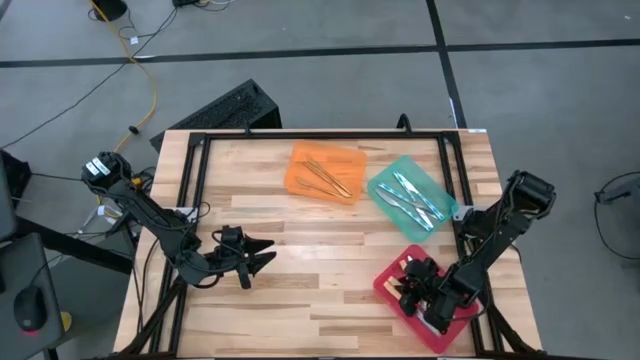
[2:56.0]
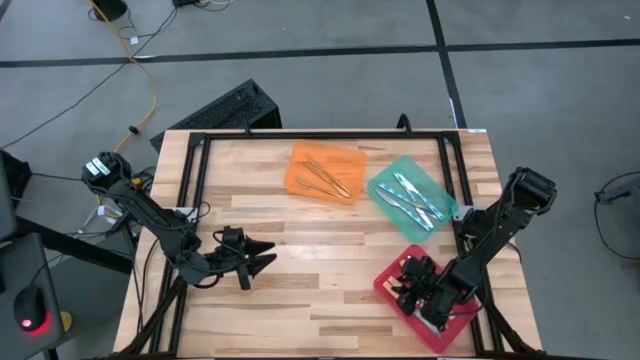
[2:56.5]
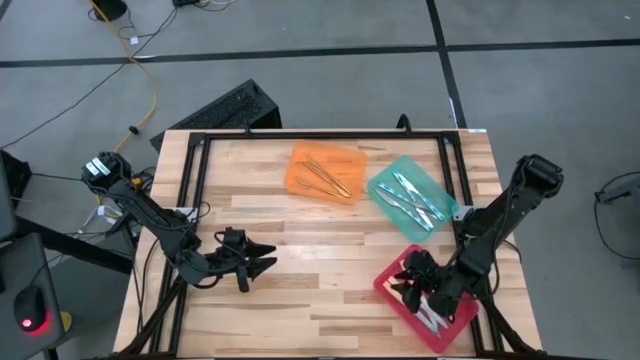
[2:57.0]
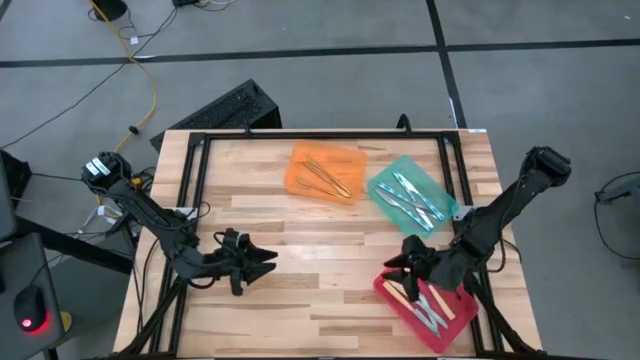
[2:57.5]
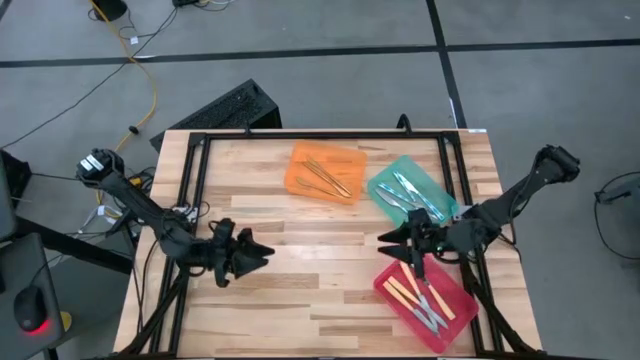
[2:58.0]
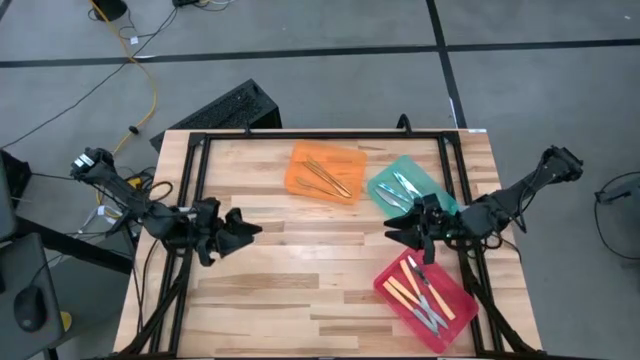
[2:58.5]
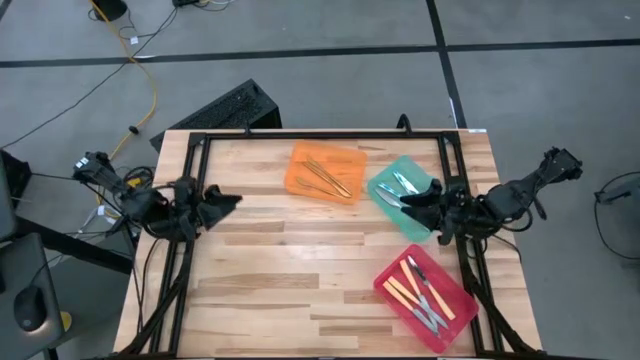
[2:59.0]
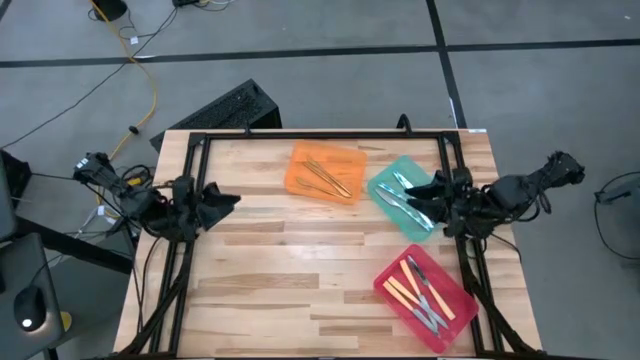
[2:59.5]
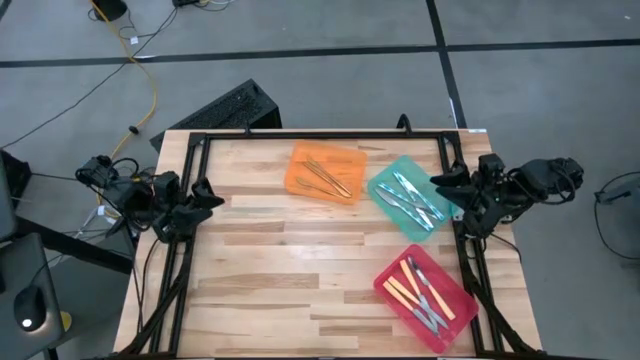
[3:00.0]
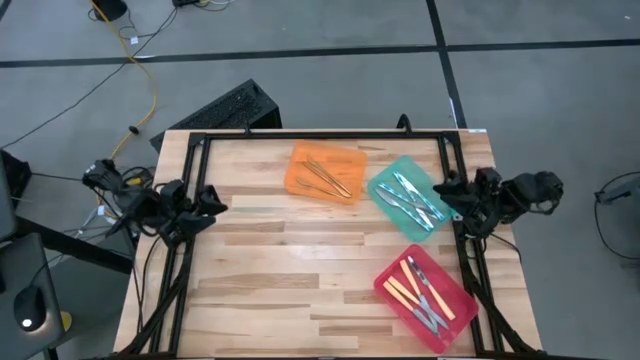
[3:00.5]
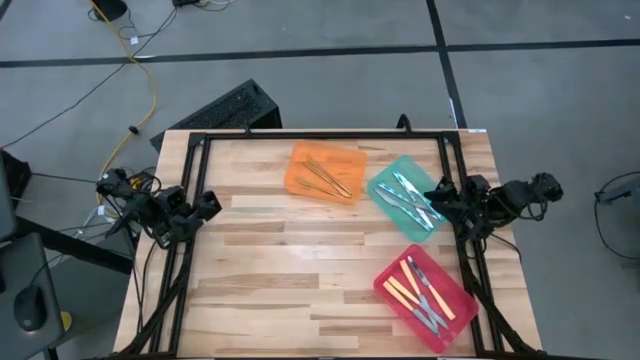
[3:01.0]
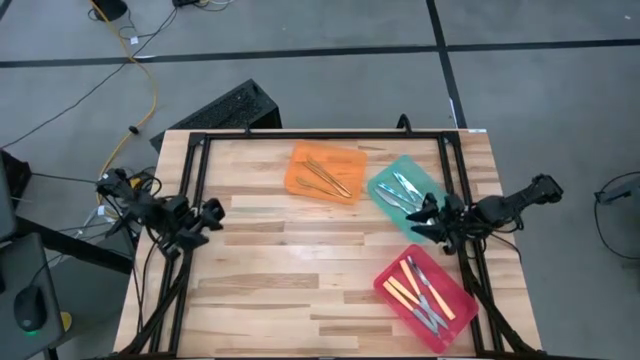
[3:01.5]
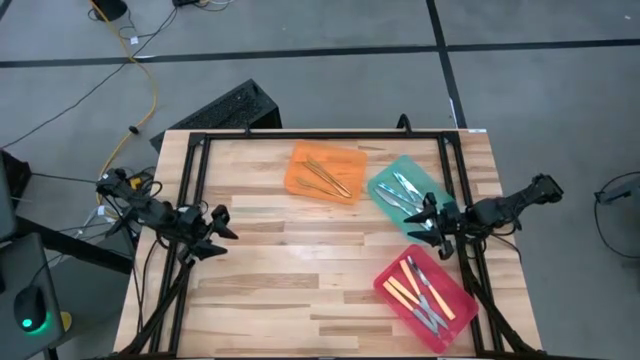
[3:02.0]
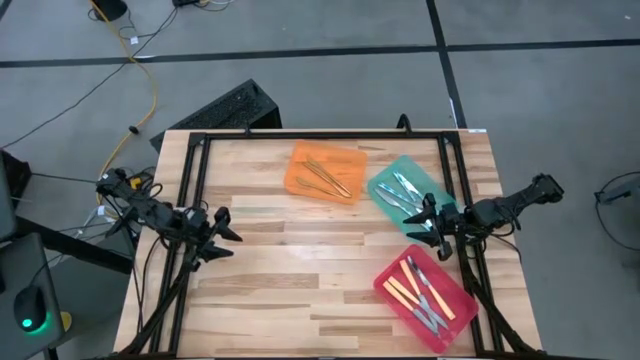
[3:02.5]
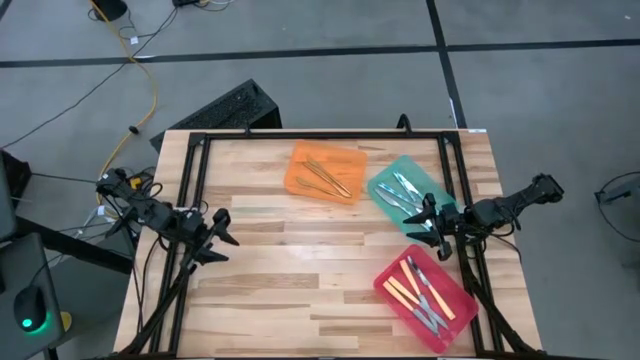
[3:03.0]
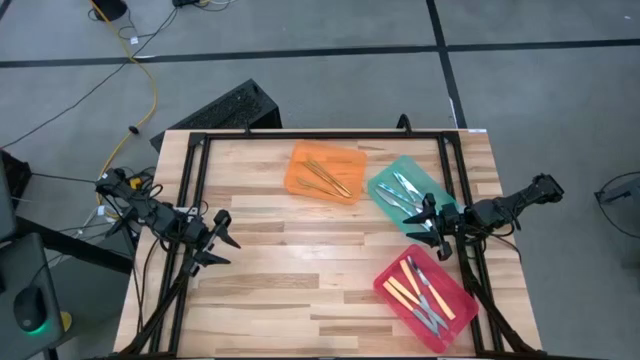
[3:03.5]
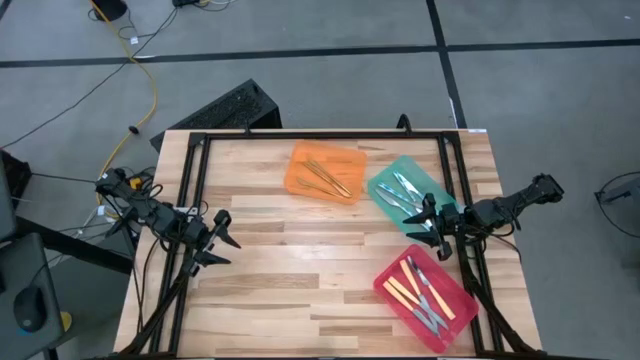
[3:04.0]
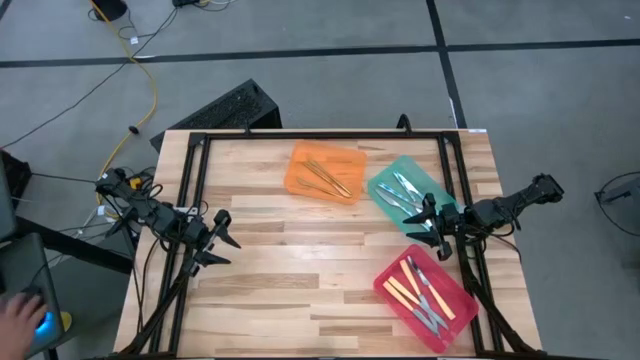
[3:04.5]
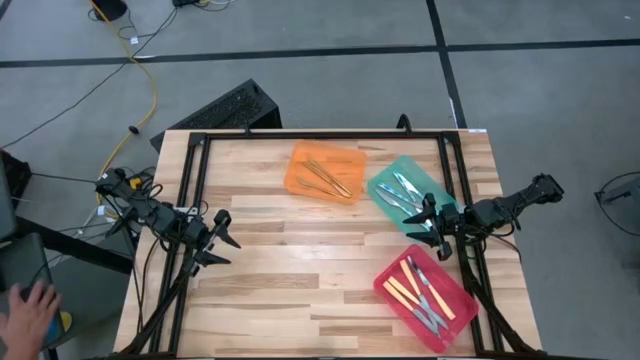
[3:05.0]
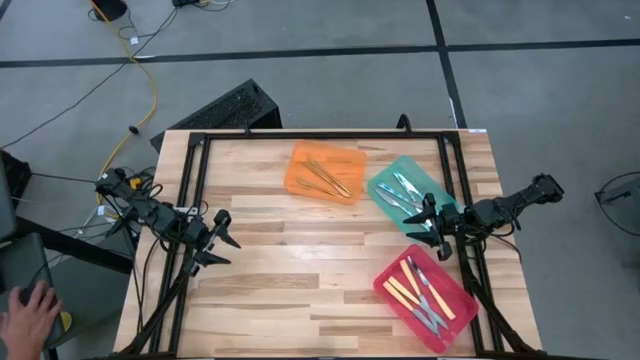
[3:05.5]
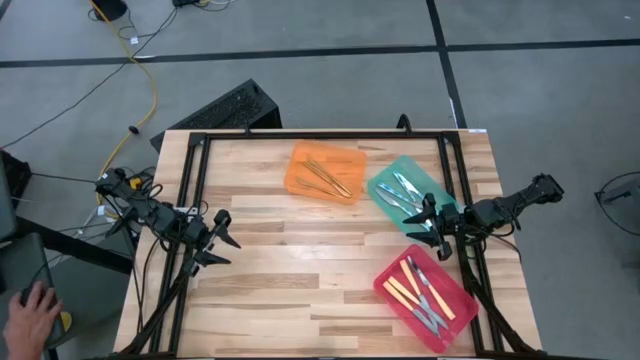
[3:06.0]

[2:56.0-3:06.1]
Task: Sort silverware by color (type)
Return to Home Position

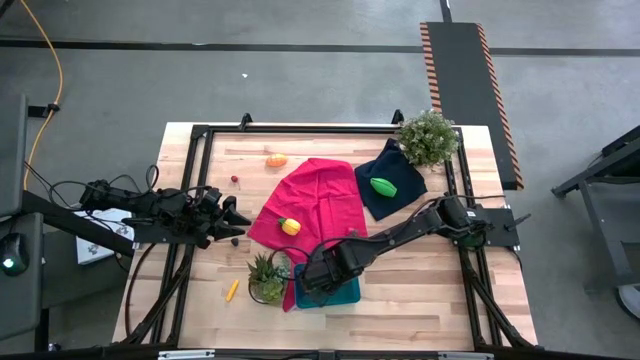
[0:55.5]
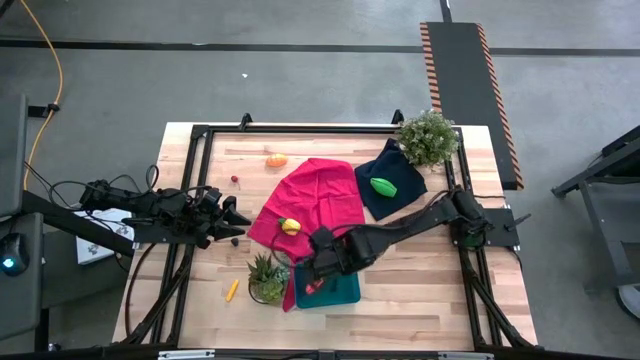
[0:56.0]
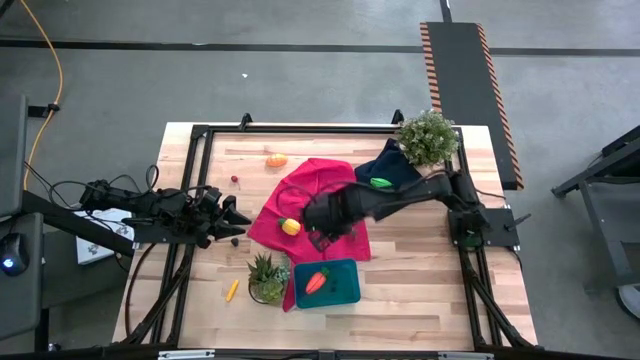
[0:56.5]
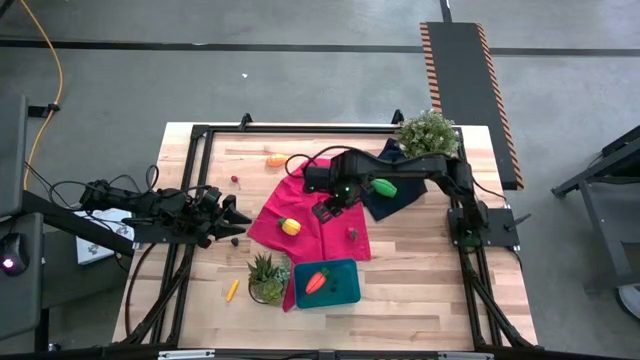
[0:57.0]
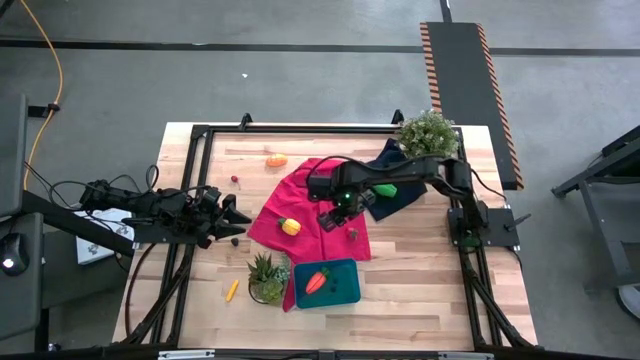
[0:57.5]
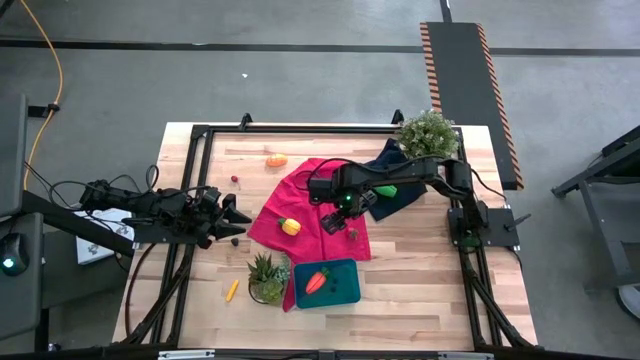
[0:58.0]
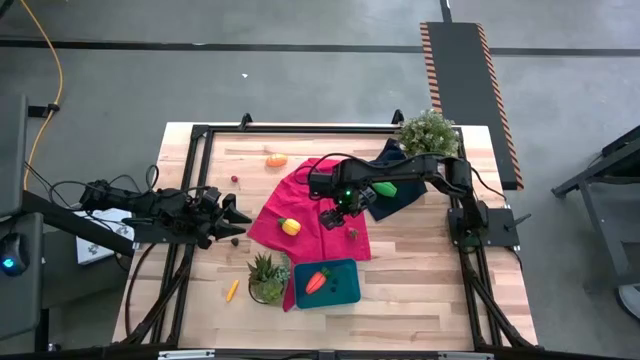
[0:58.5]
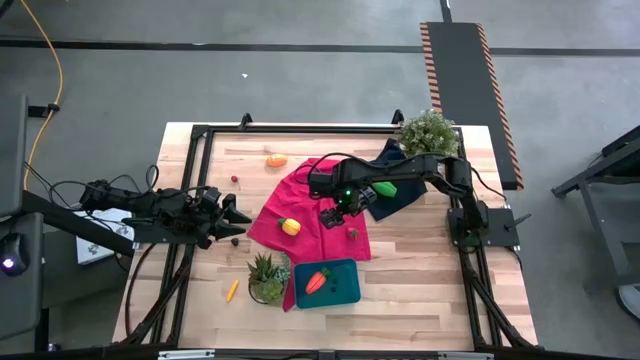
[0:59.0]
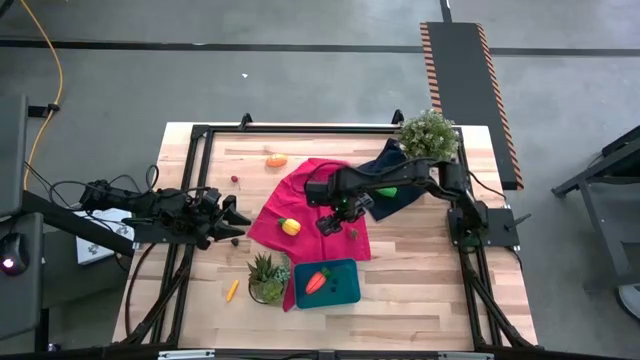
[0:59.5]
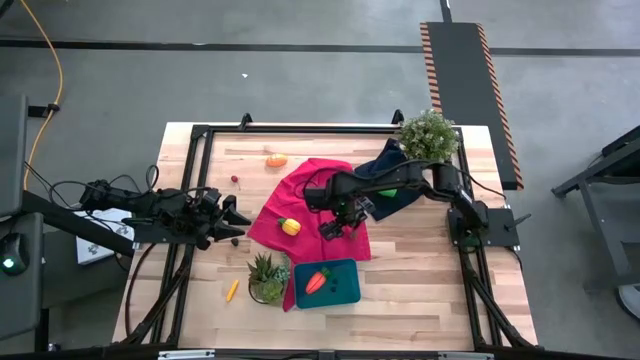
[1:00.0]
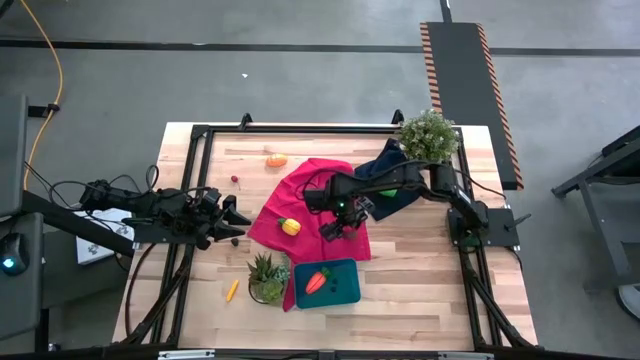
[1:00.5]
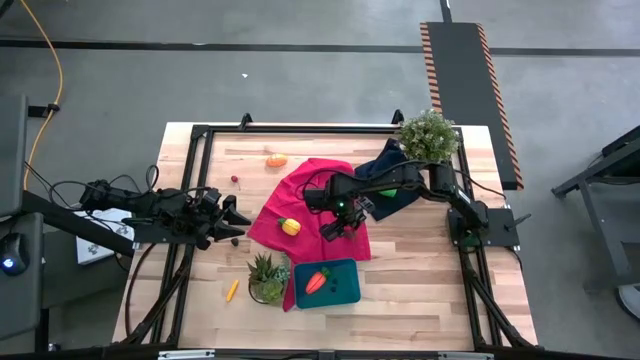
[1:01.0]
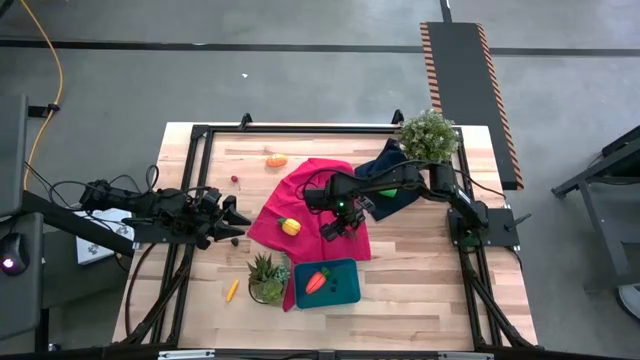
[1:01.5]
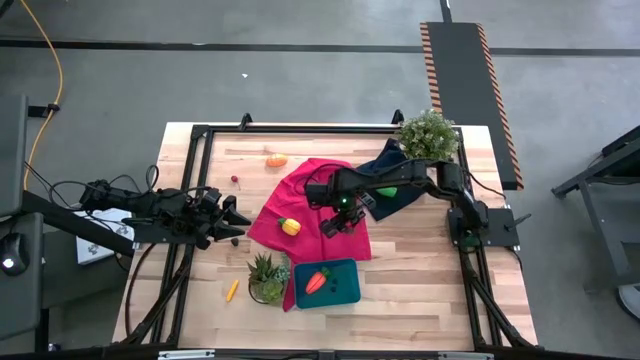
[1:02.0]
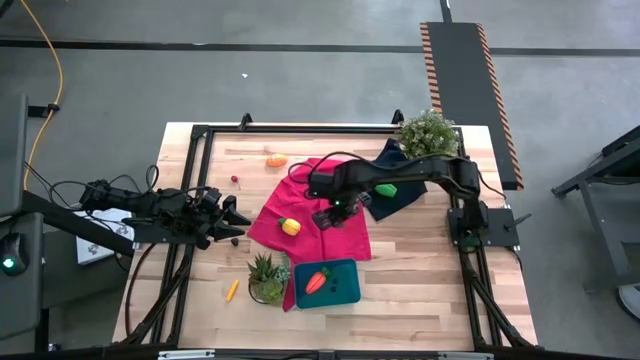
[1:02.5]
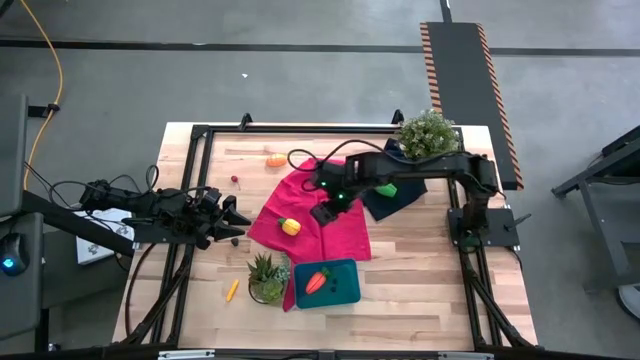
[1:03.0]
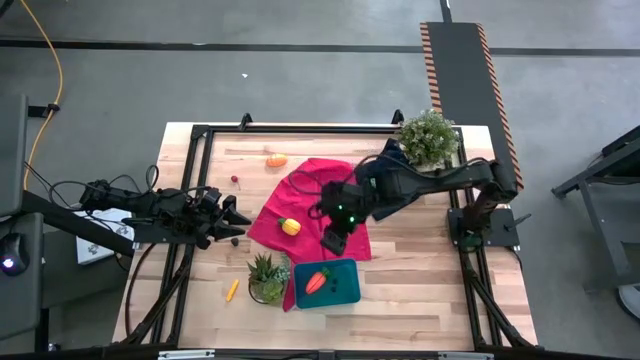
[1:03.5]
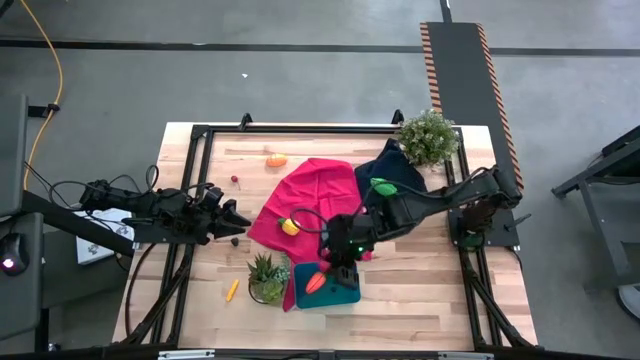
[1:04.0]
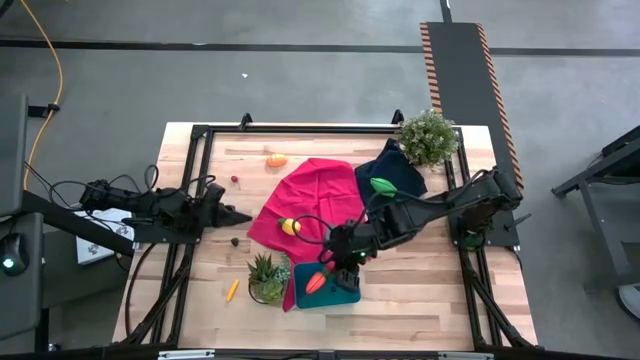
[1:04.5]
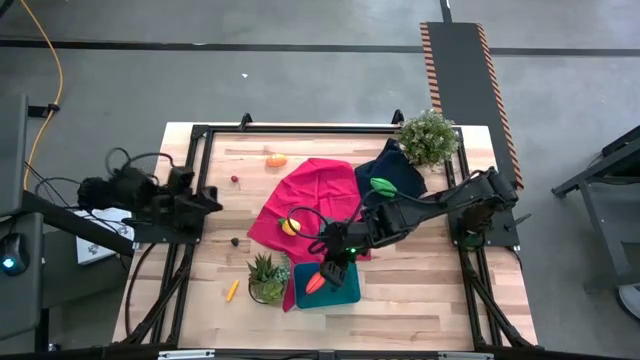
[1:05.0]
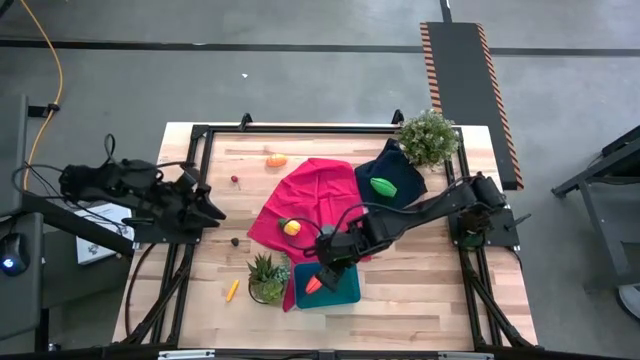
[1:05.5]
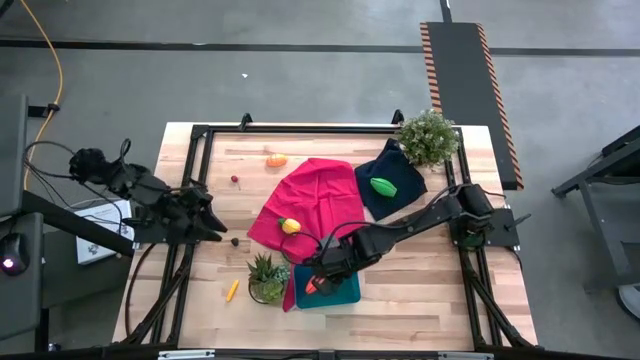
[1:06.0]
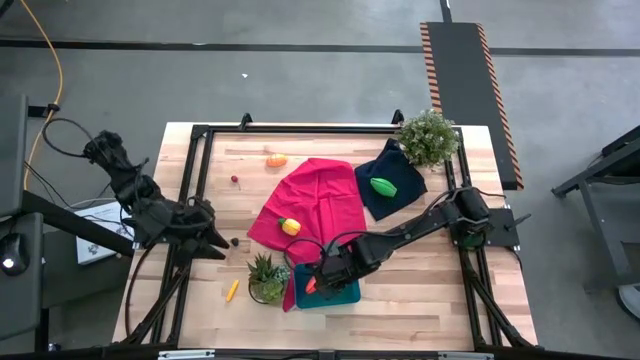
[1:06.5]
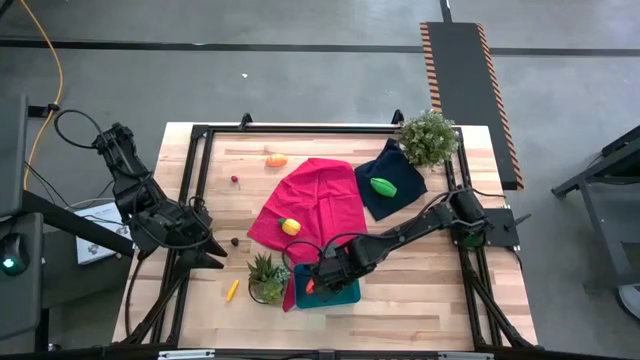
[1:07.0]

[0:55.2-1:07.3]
Task: Pick and placing Produce into tupperware
Put the red strawberry into the blue bin
